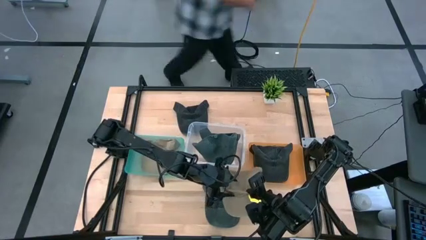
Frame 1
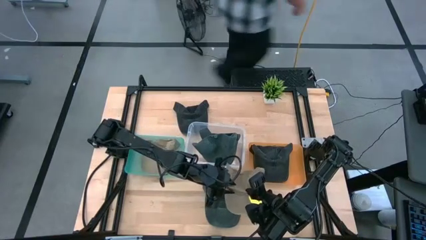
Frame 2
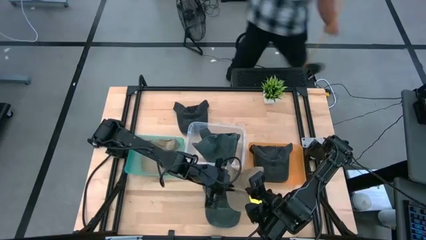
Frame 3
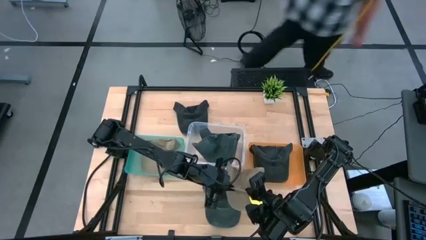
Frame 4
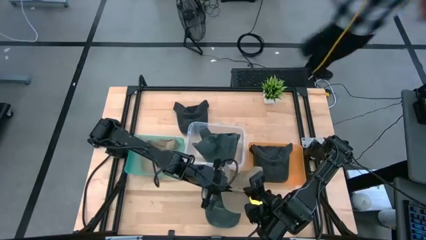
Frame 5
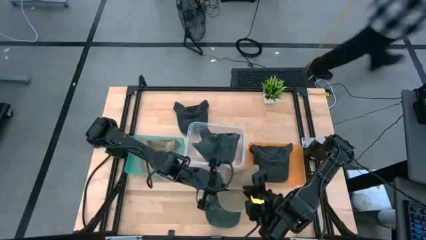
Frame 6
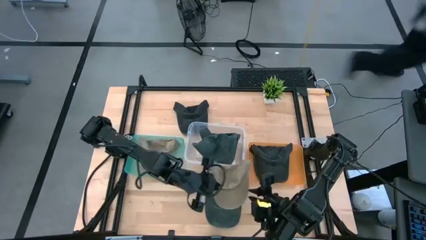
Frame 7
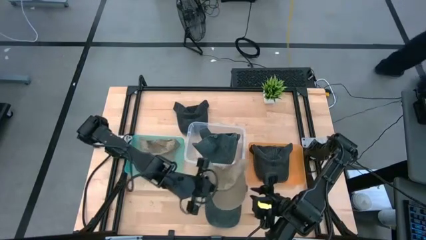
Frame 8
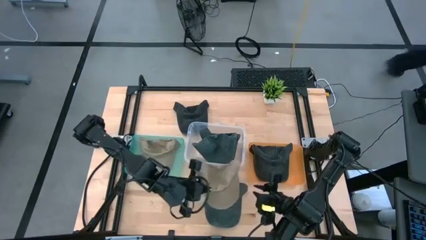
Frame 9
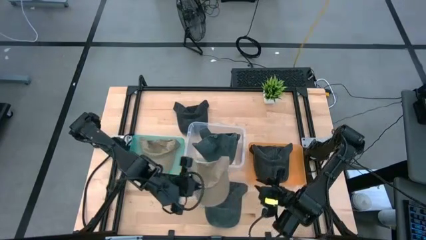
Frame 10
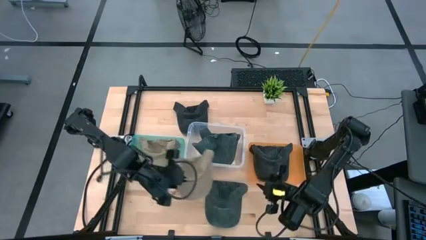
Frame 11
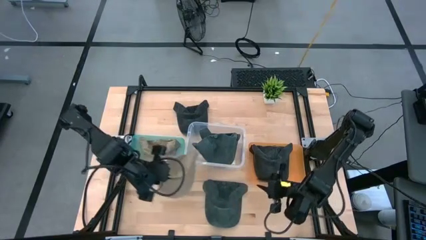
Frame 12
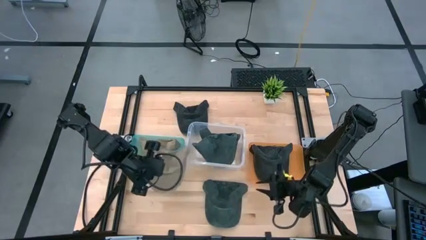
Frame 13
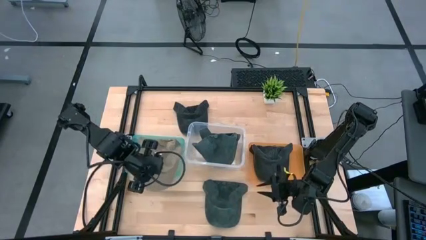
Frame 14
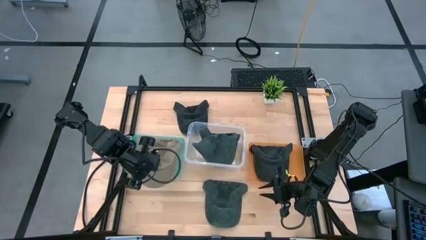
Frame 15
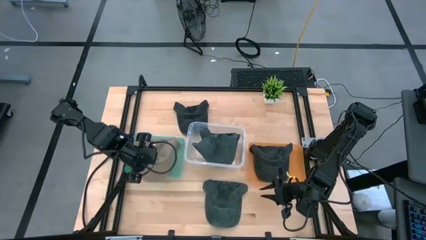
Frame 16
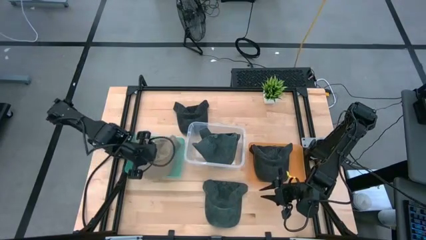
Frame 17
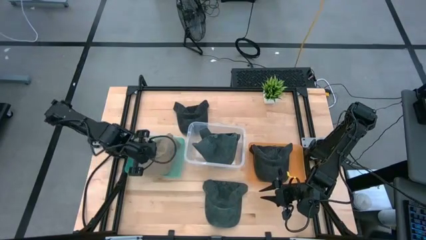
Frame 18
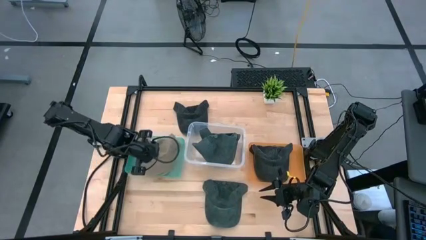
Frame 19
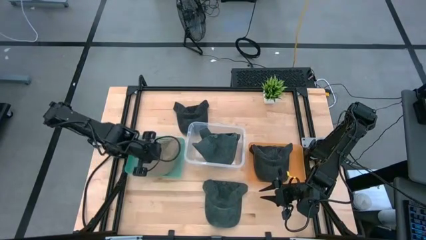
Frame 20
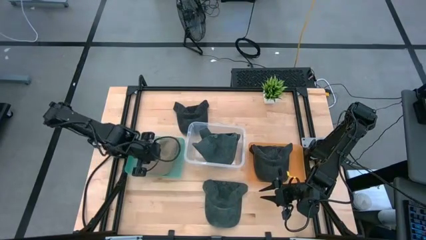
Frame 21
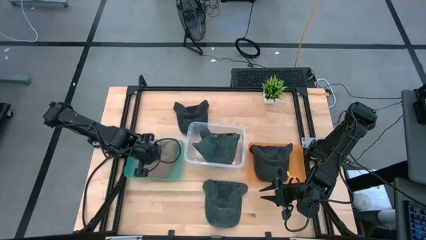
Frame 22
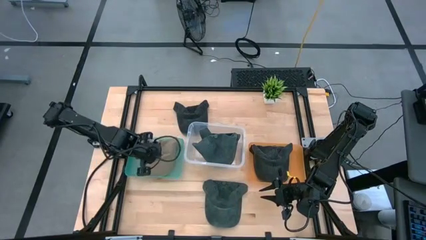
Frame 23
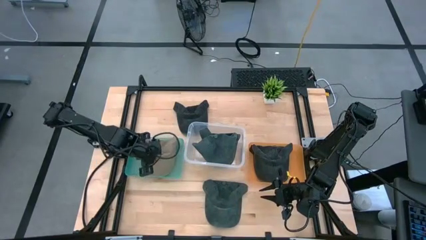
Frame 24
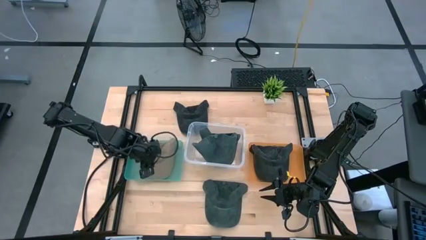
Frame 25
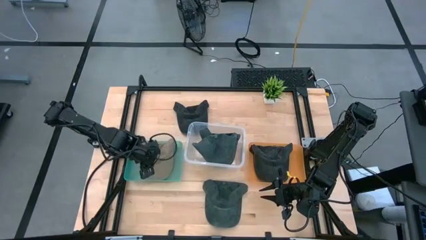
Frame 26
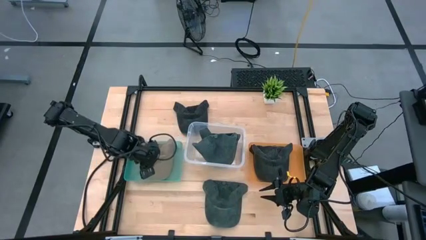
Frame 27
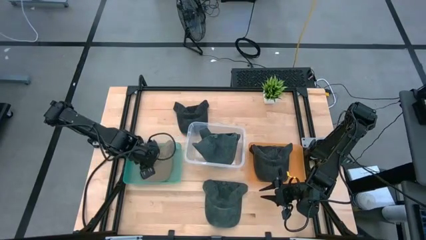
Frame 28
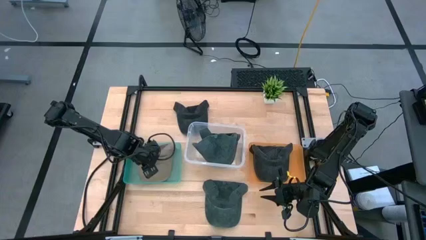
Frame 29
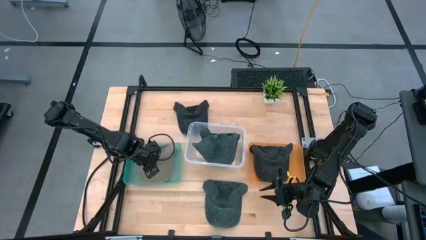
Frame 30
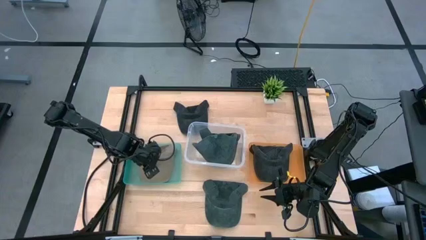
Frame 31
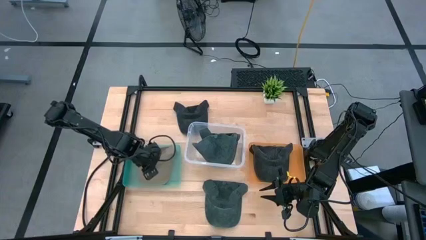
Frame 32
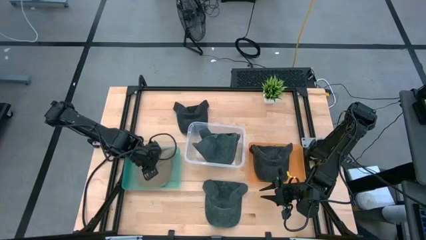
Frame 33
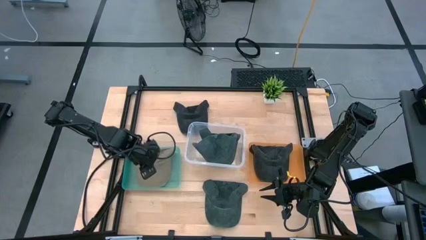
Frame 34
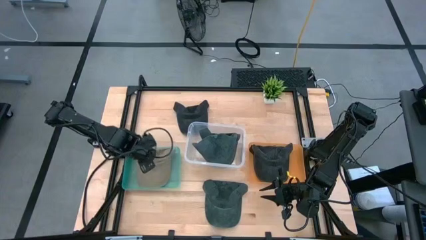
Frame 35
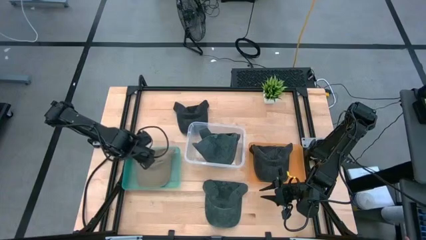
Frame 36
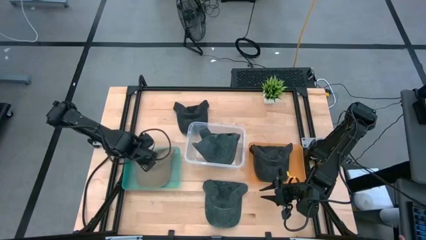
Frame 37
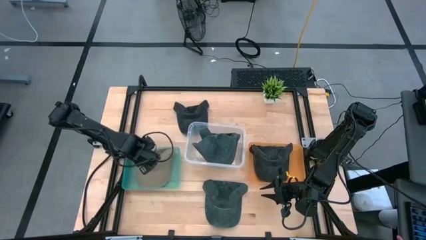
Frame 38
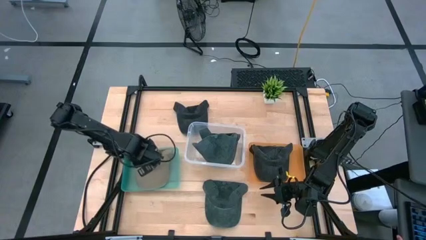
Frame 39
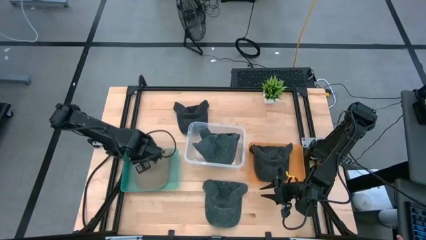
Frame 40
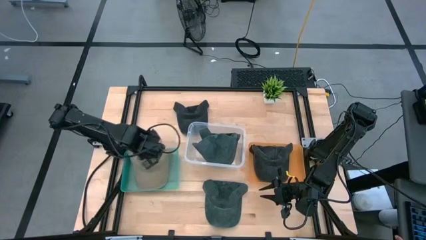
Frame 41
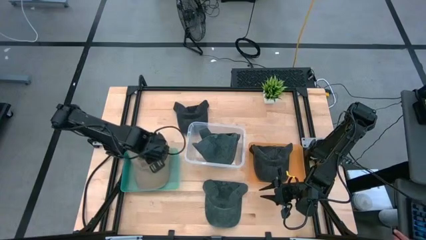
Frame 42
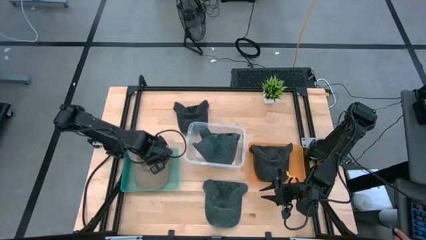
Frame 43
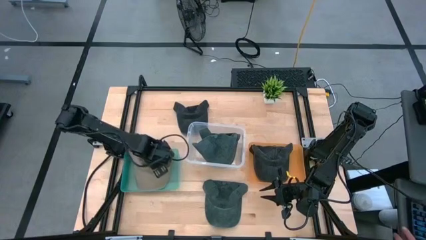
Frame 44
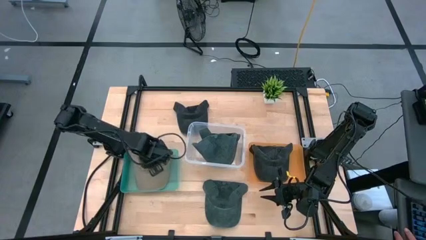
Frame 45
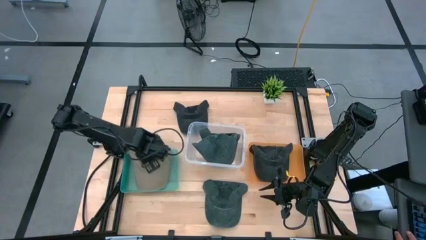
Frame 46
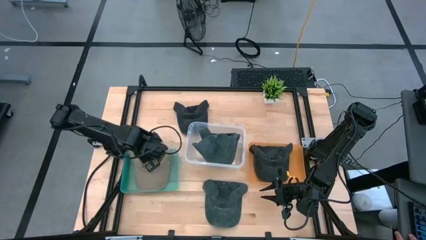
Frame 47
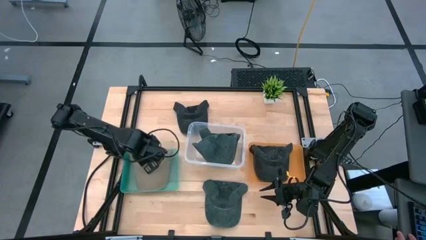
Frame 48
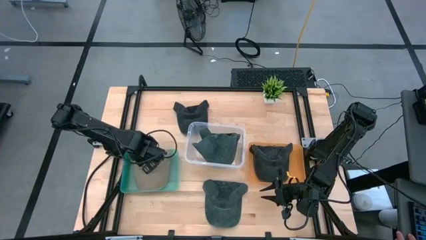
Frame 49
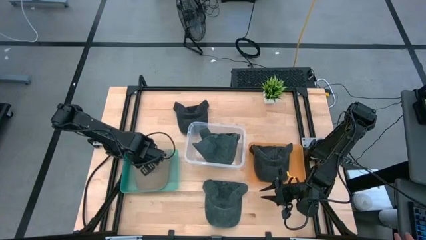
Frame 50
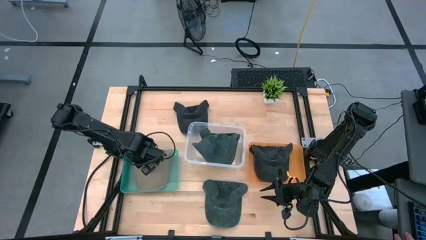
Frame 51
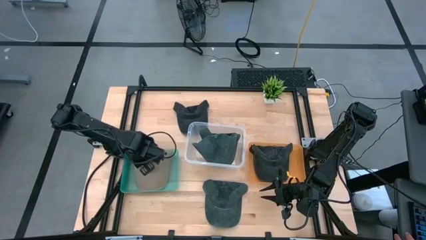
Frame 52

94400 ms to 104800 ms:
Task: Pick & Place hat
Put the brown cap into the green bin

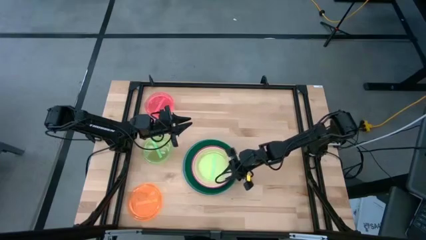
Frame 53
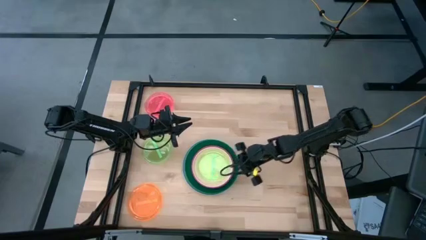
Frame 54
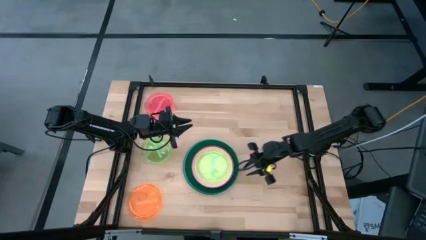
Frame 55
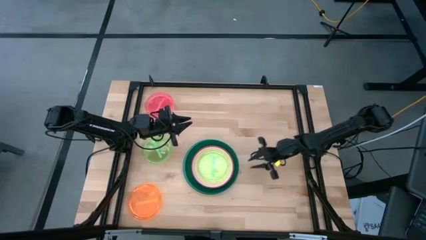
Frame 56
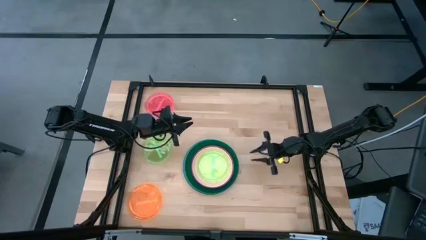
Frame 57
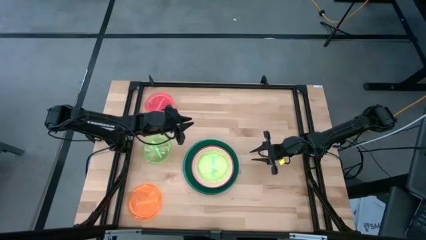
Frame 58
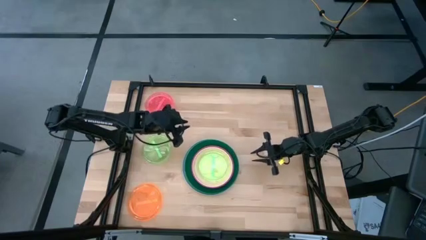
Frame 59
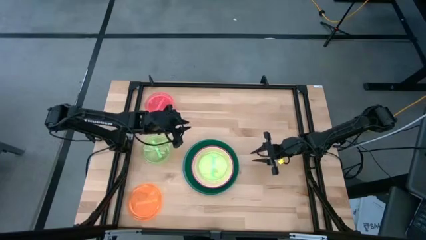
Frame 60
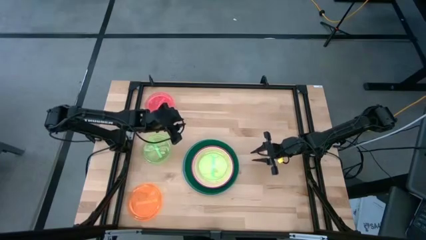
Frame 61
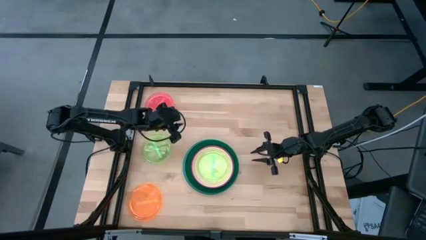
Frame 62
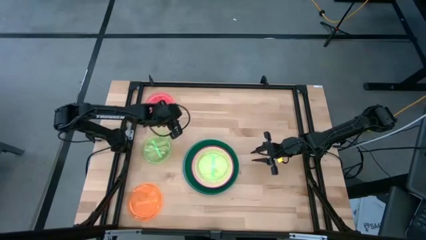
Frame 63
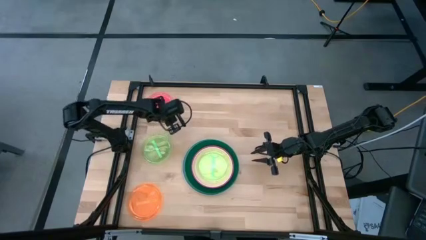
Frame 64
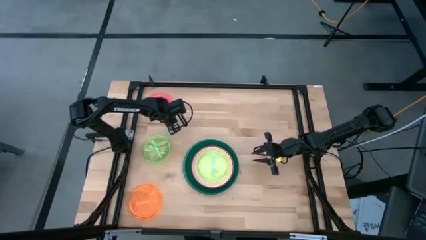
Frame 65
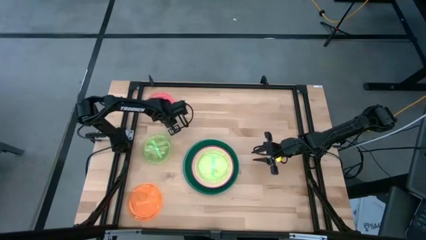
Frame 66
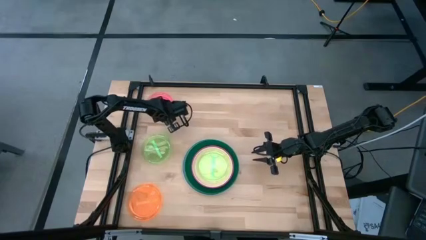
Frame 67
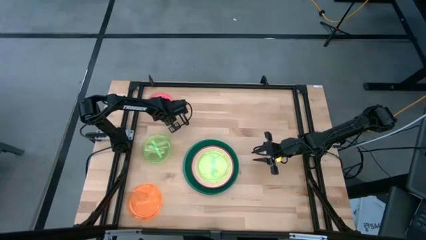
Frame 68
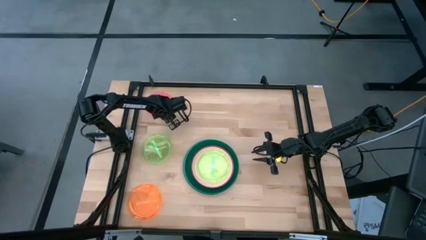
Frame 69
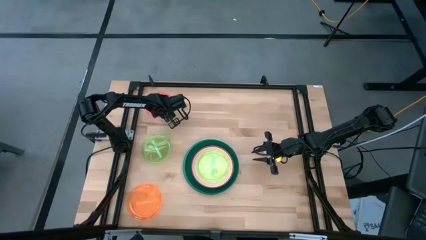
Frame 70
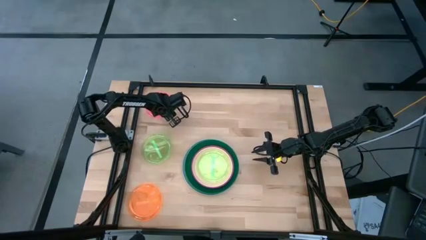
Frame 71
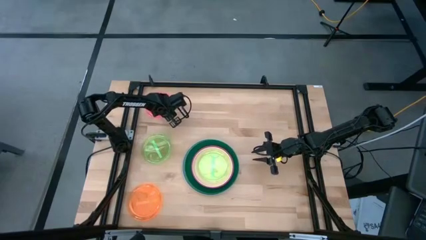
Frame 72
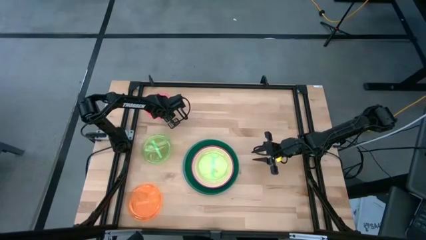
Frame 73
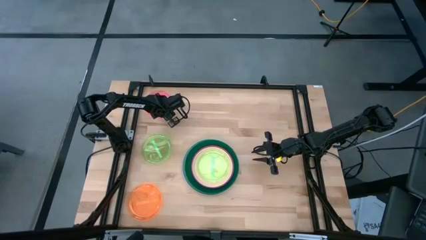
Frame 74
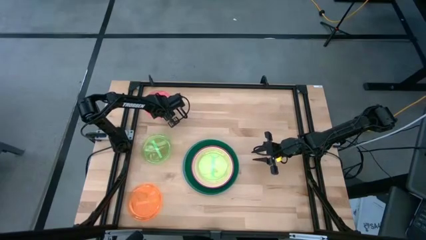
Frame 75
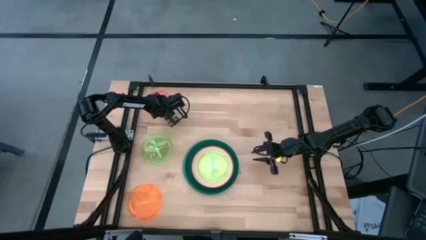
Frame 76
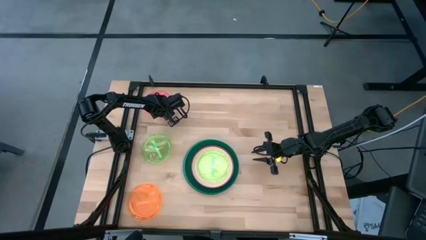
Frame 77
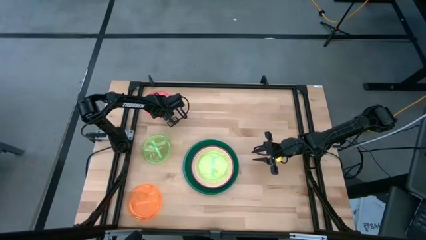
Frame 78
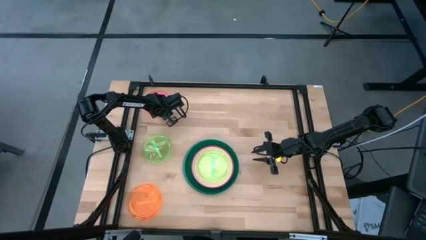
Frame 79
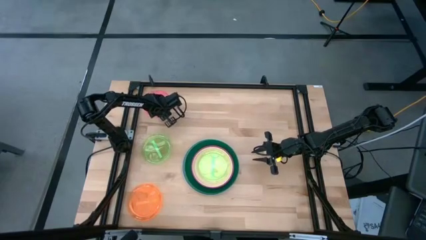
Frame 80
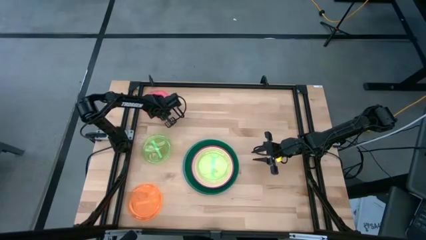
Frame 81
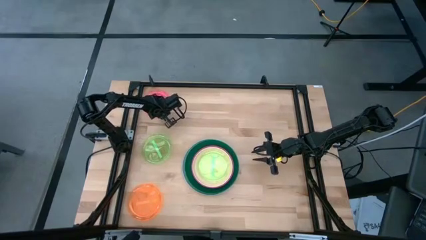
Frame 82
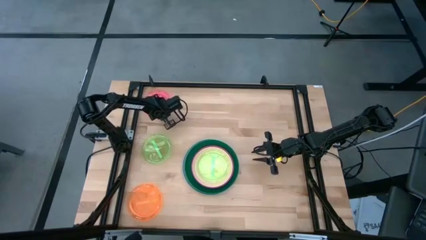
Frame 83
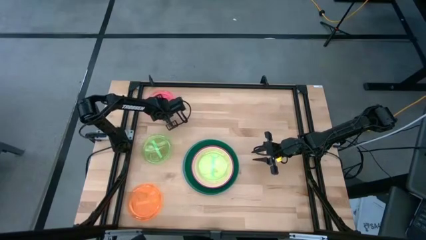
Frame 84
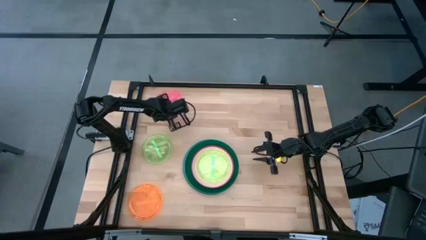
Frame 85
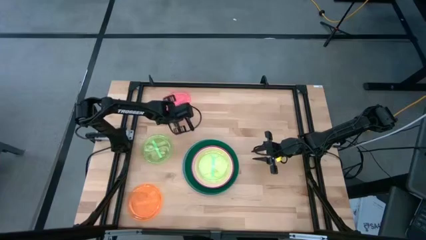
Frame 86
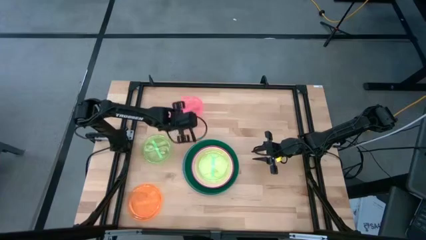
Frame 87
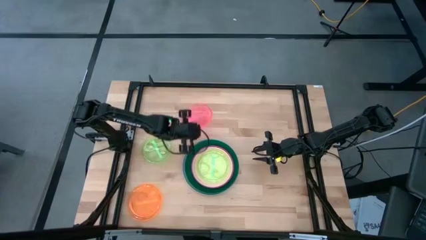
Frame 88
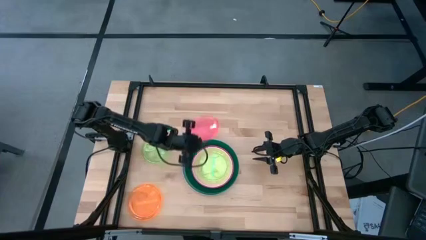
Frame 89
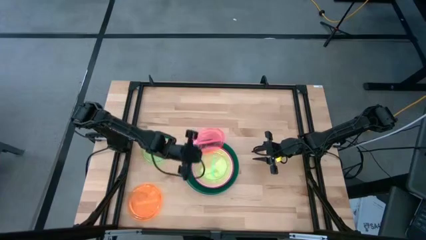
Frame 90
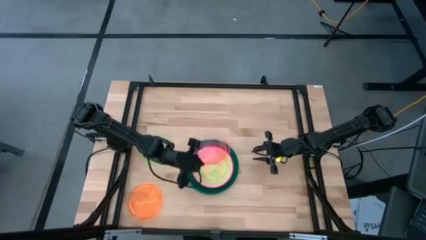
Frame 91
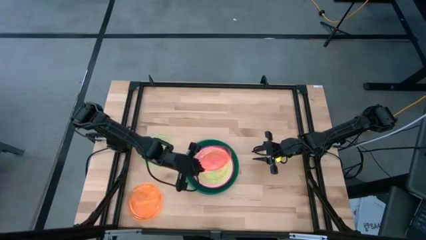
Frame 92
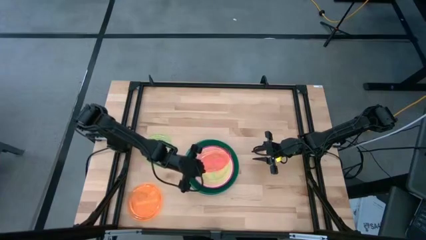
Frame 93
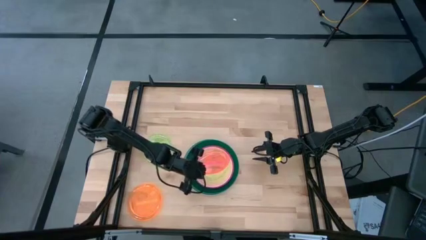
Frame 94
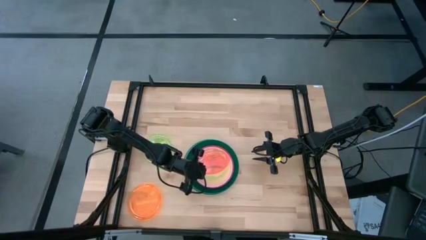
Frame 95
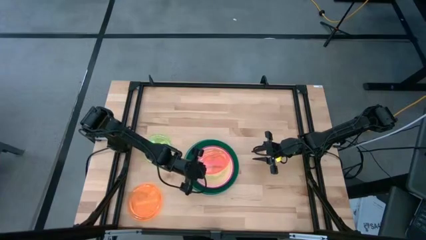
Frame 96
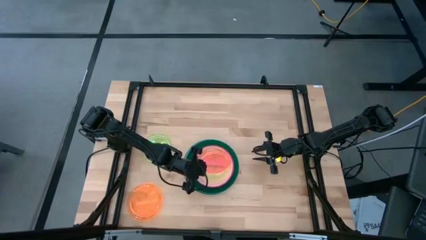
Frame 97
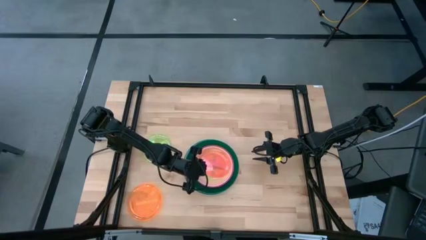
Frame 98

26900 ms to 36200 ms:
Task: Stack plastic plates
Stack the light pink plate o top of the light green plate
